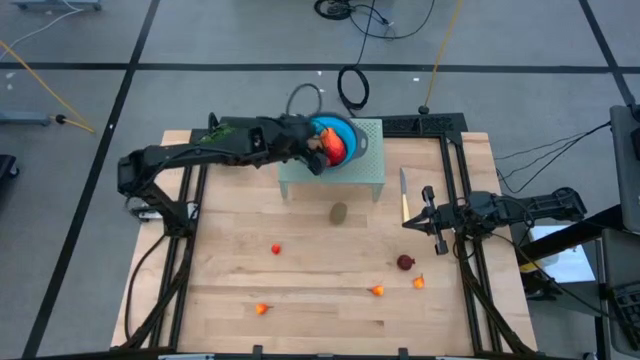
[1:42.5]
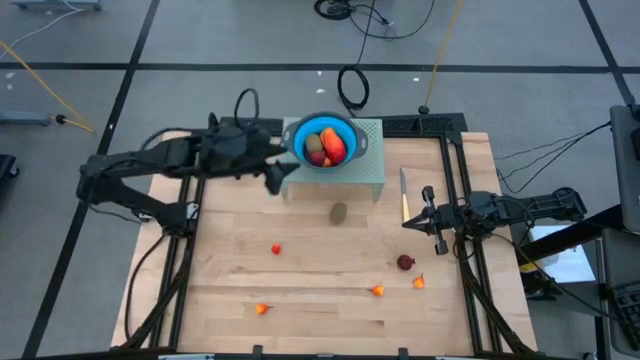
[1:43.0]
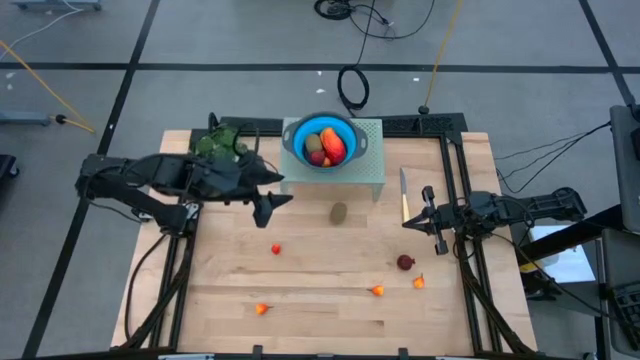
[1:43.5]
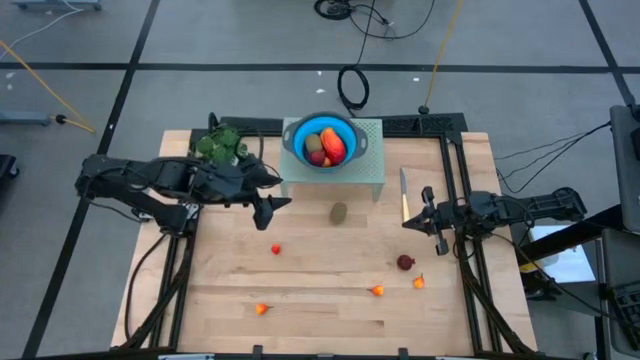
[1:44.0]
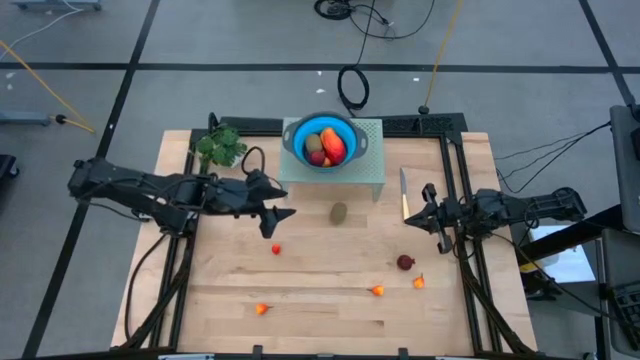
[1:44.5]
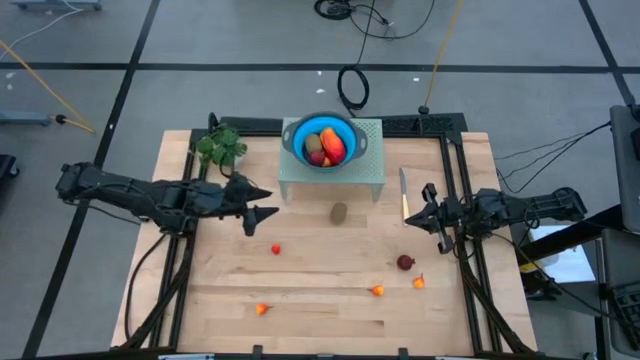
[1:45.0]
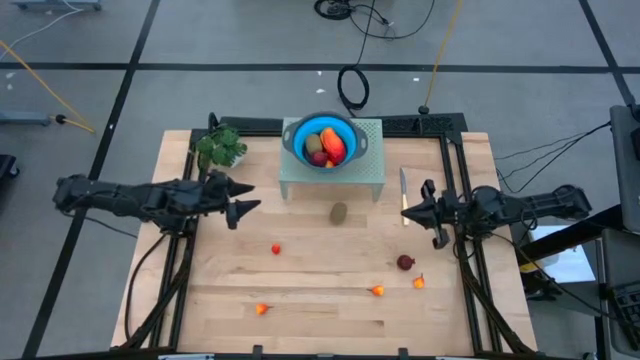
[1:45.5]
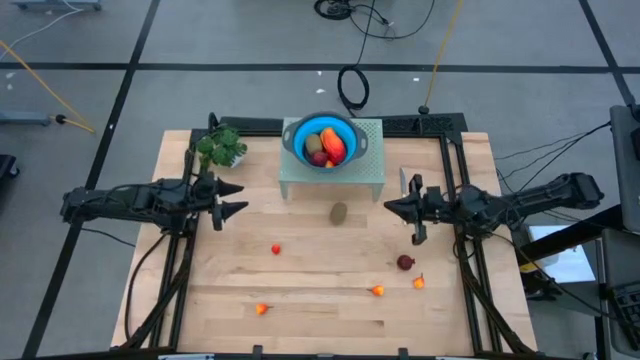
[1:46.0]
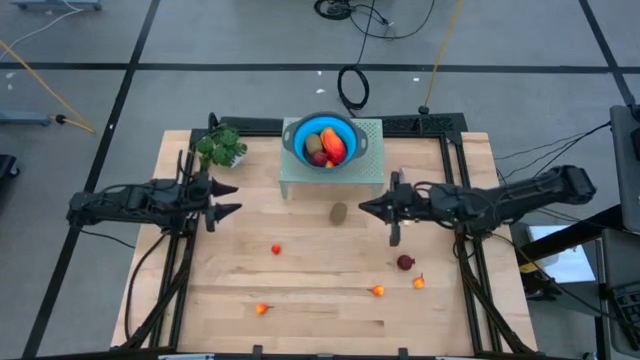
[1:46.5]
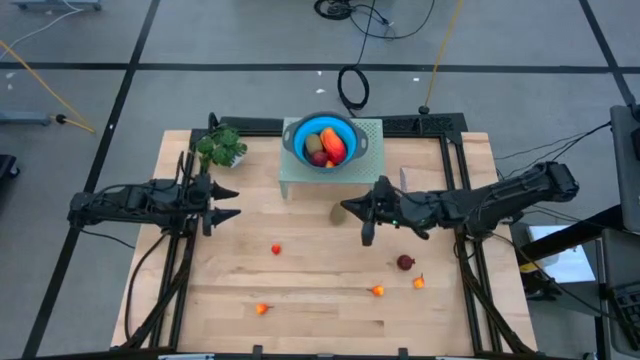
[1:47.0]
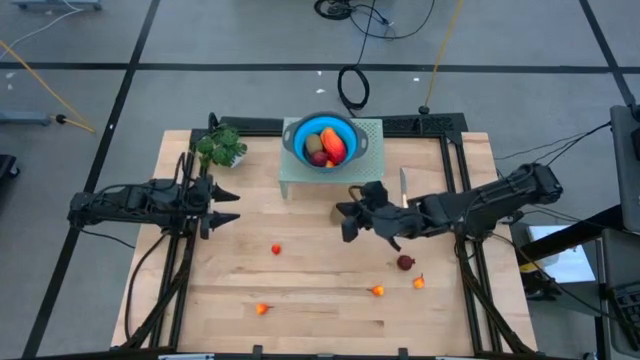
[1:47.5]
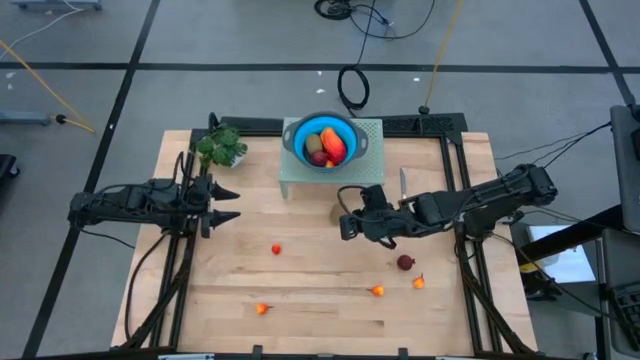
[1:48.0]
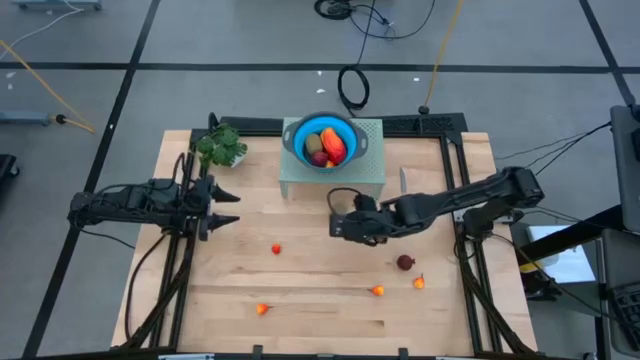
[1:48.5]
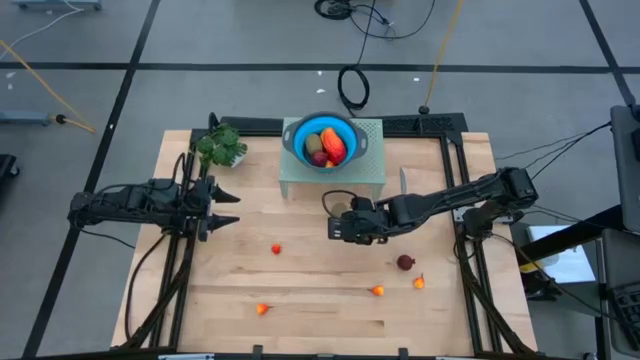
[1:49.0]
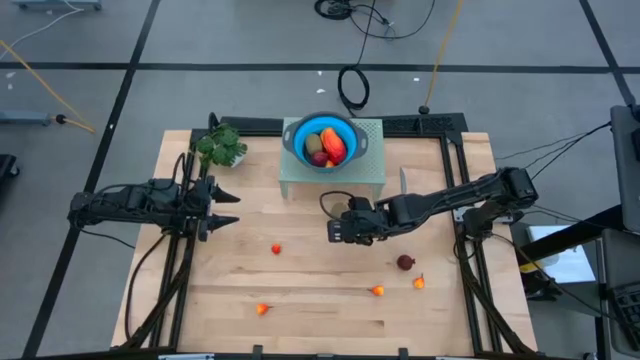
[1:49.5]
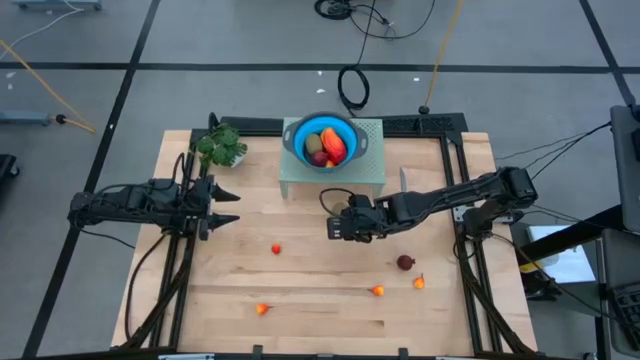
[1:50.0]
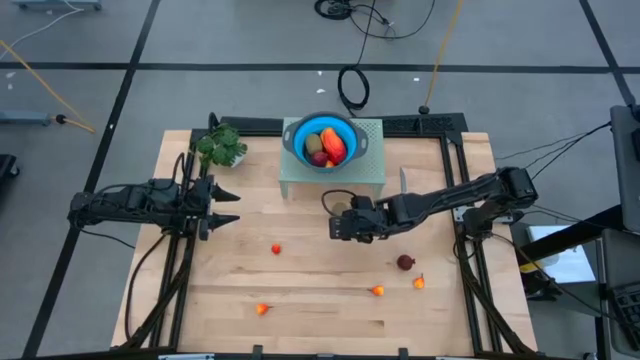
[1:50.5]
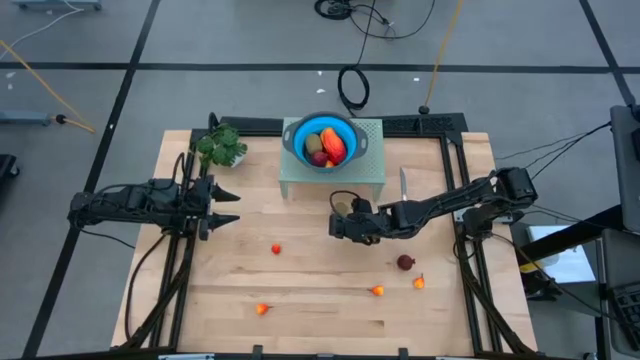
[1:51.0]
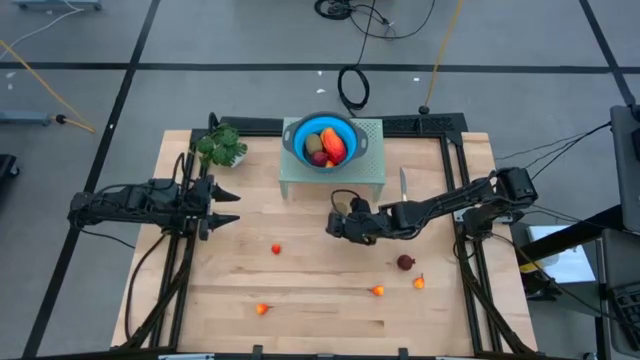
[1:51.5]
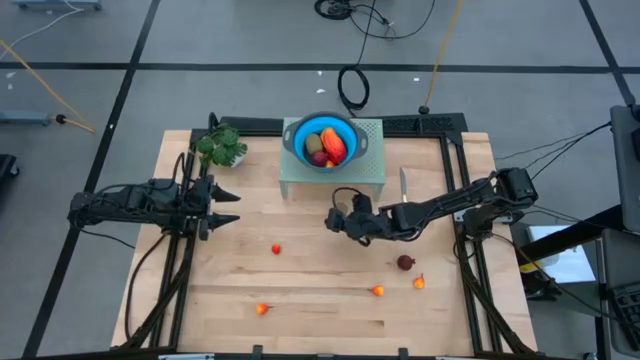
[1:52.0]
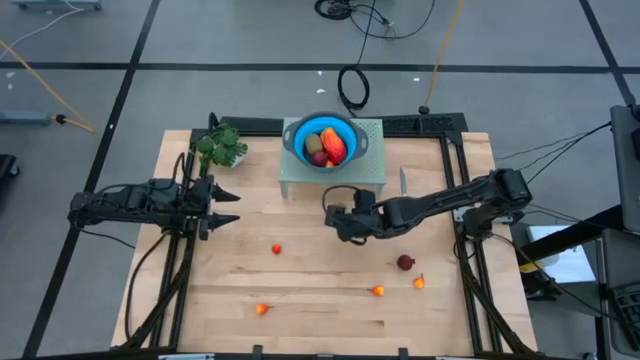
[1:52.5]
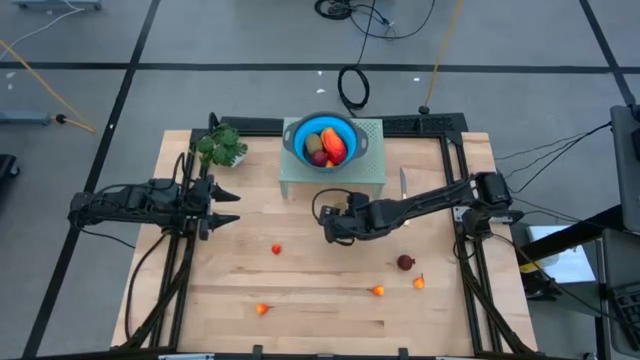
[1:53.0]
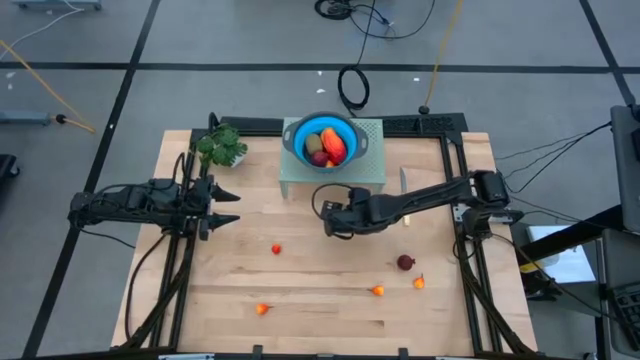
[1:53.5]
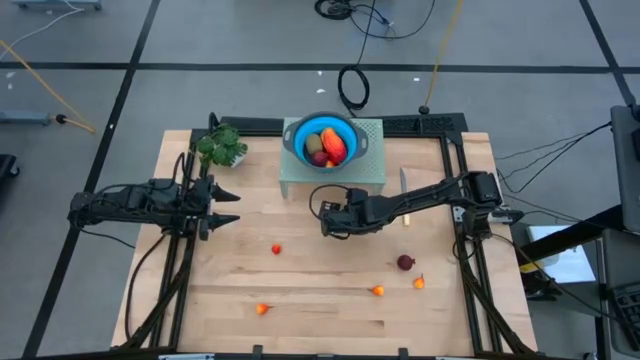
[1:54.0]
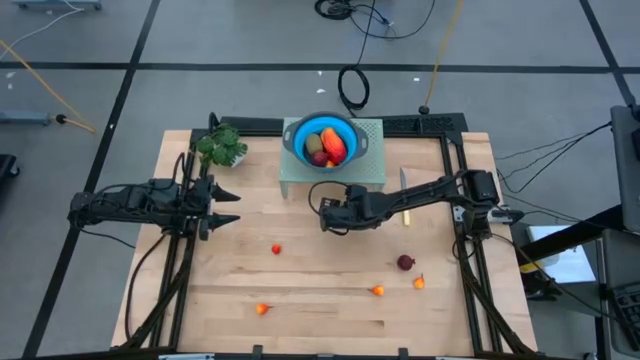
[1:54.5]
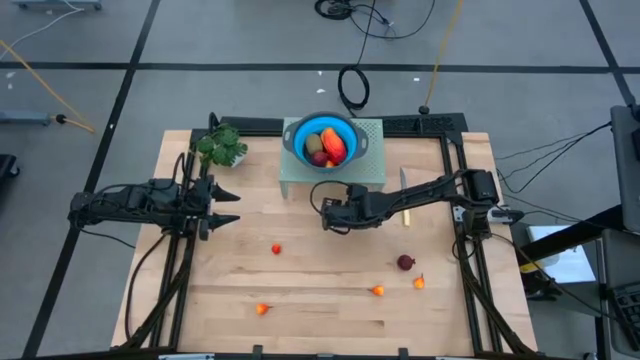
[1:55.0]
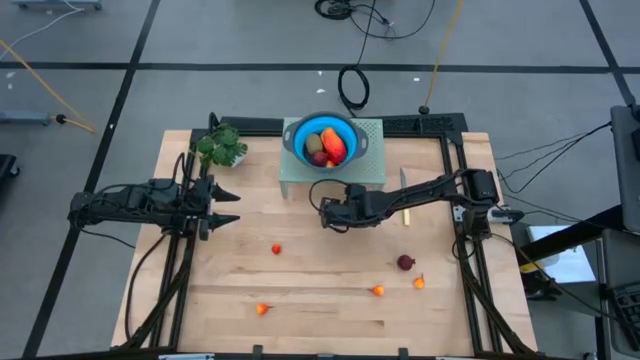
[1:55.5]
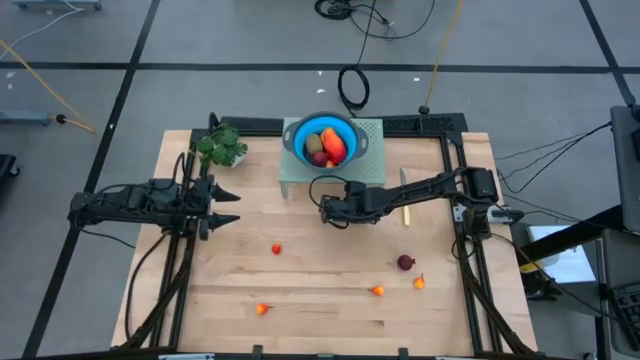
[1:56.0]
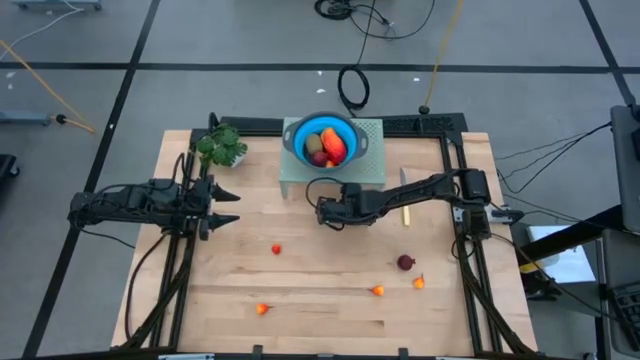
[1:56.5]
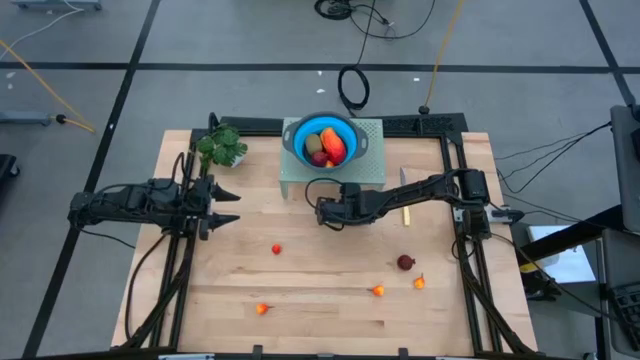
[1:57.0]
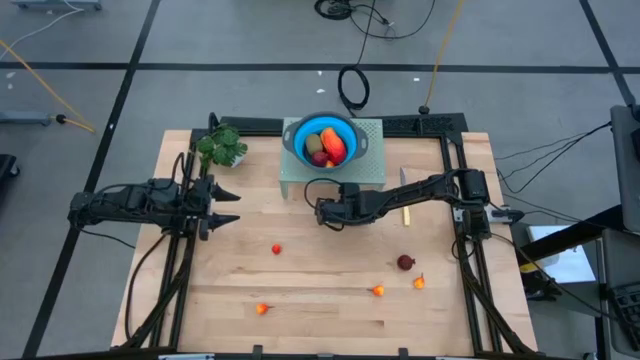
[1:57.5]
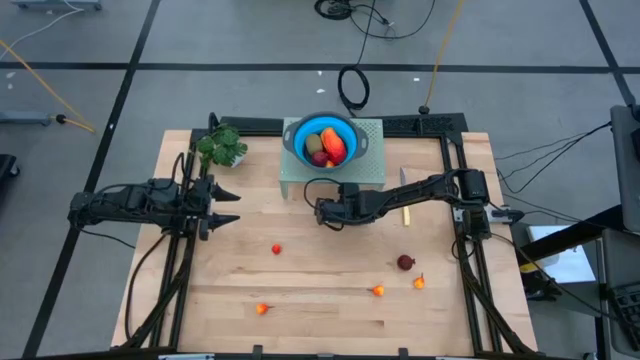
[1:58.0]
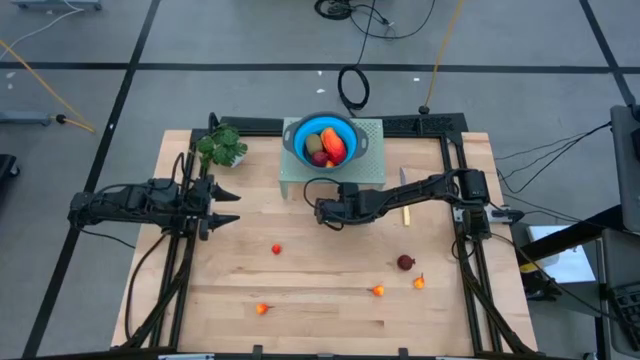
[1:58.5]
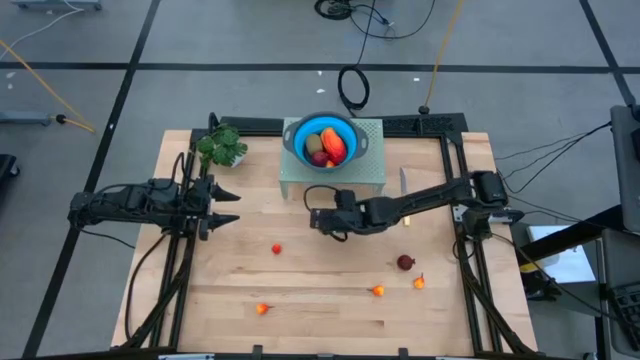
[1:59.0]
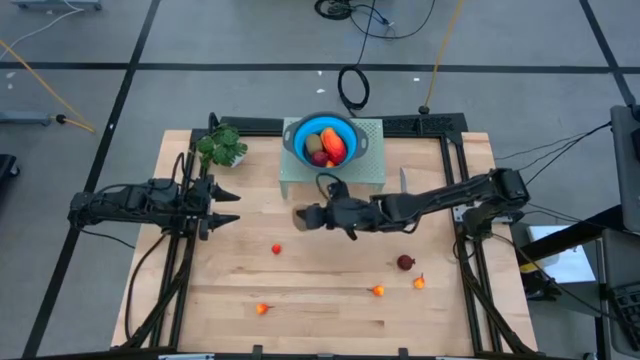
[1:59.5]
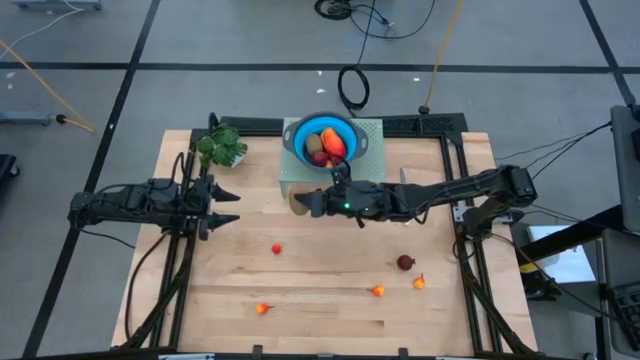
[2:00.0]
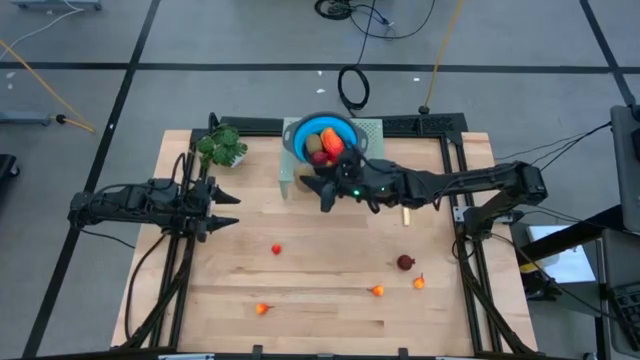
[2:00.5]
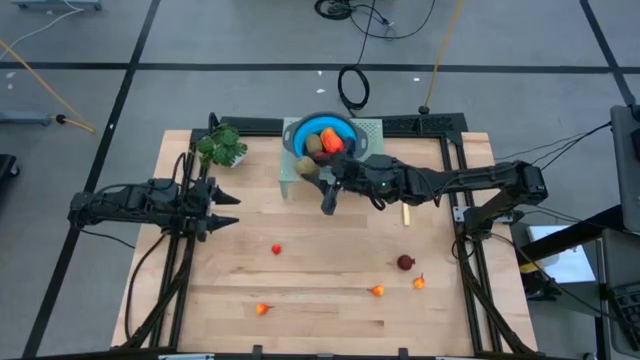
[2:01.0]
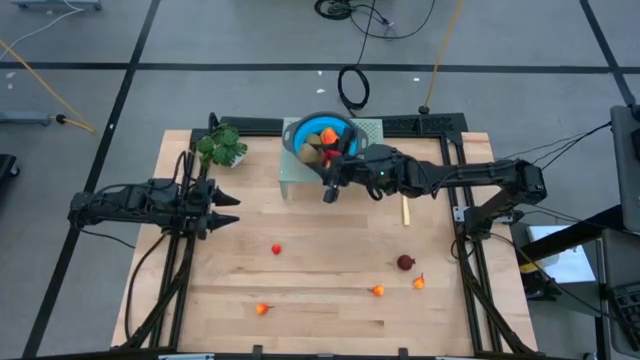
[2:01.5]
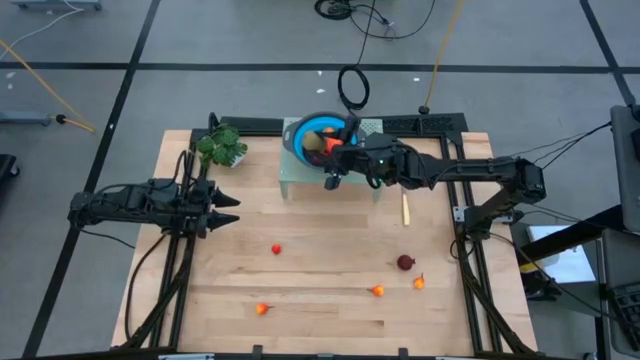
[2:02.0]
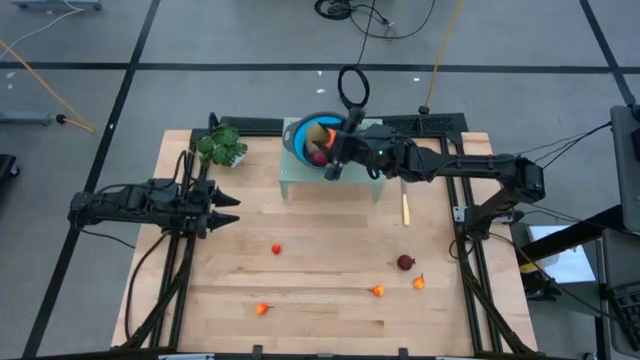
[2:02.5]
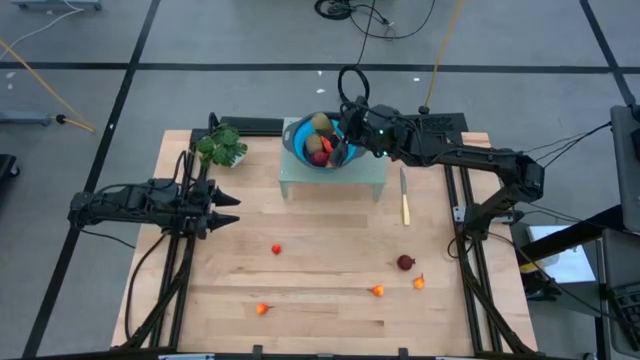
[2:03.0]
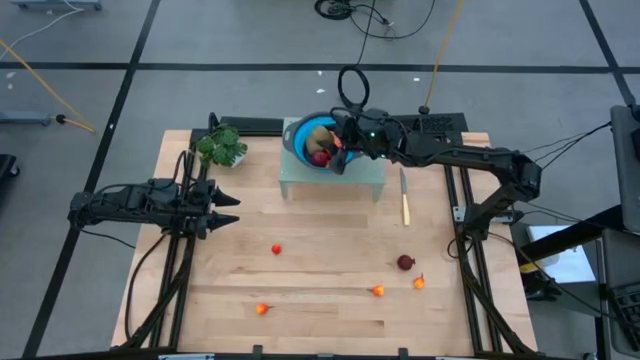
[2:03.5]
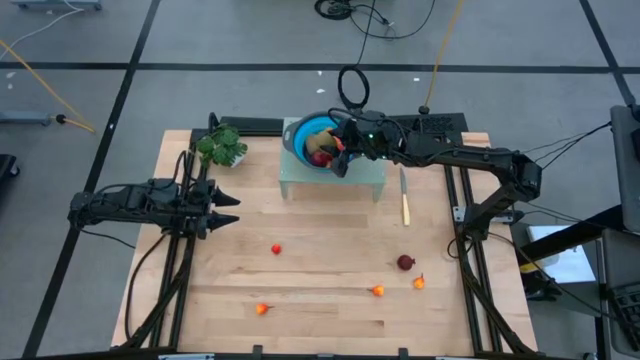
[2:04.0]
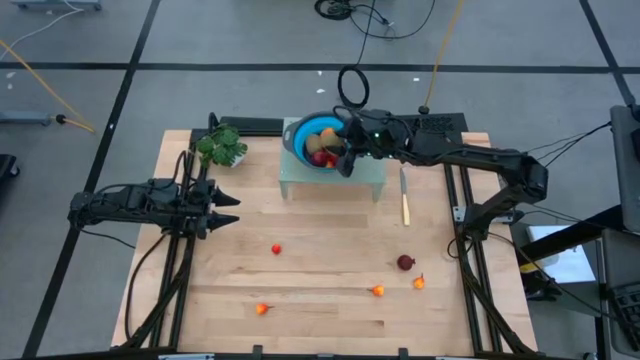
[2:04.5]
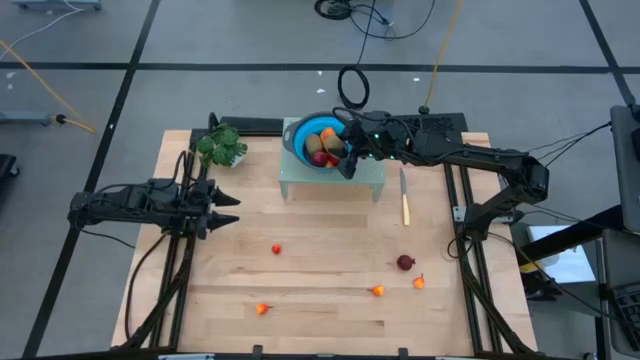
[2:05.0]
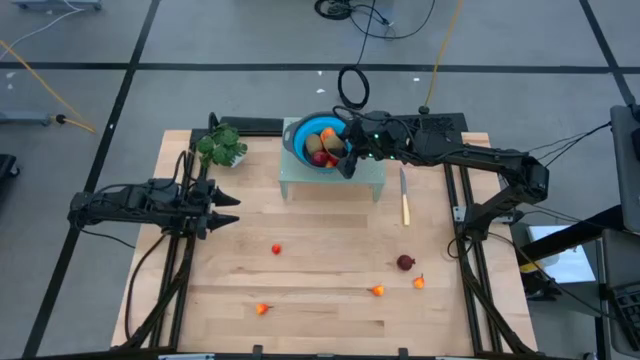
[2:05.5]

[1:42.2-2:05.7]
Task: Pick & Place Fruit
Put the kiwi into the colander on the shelf
